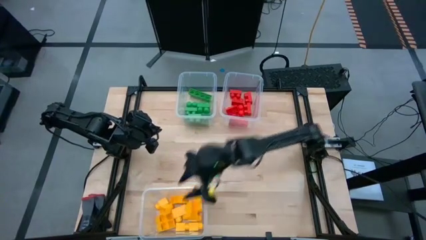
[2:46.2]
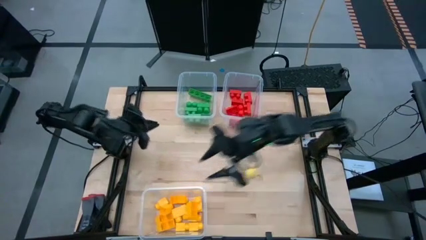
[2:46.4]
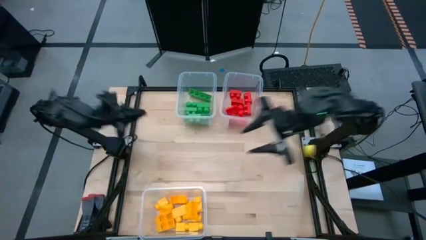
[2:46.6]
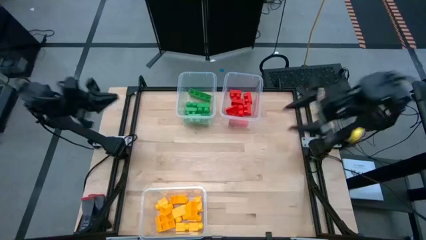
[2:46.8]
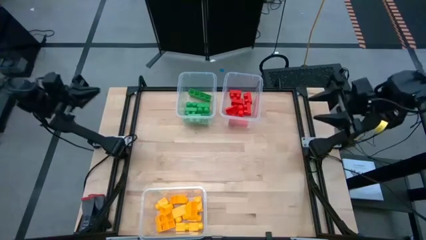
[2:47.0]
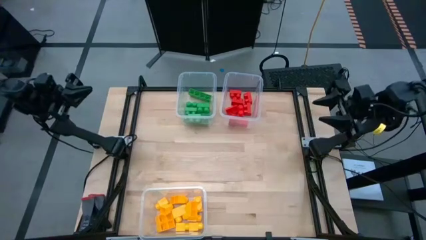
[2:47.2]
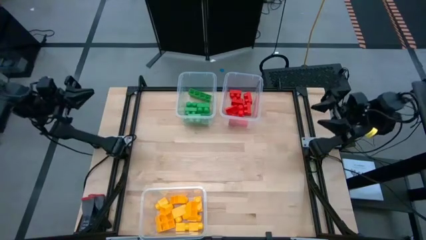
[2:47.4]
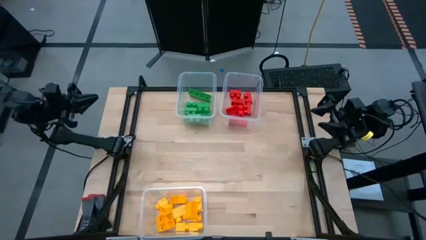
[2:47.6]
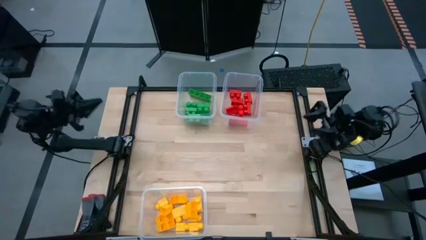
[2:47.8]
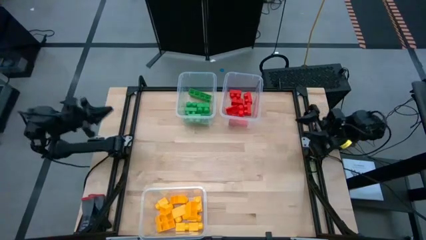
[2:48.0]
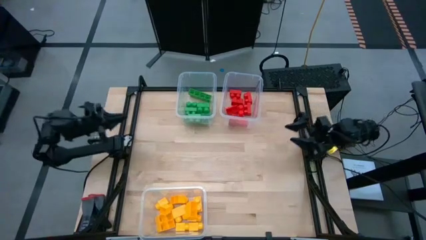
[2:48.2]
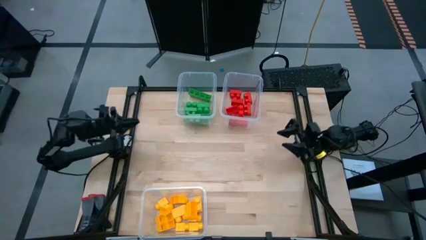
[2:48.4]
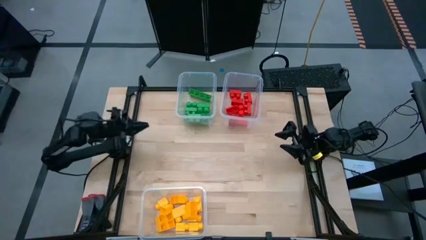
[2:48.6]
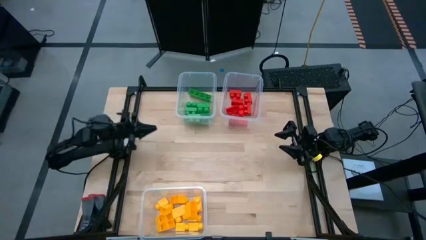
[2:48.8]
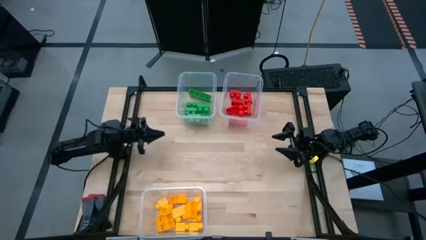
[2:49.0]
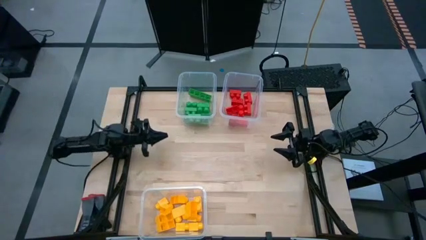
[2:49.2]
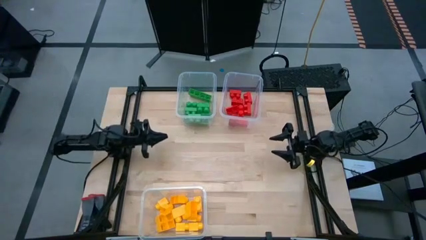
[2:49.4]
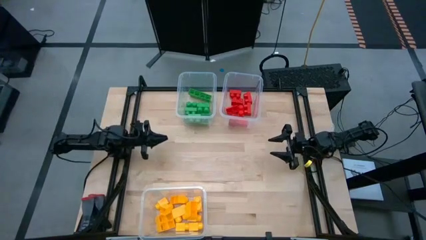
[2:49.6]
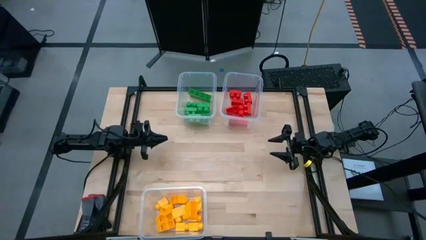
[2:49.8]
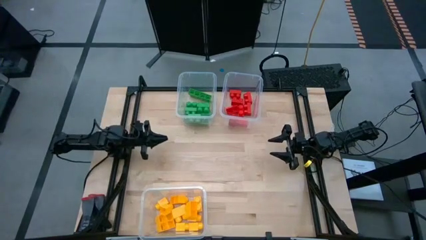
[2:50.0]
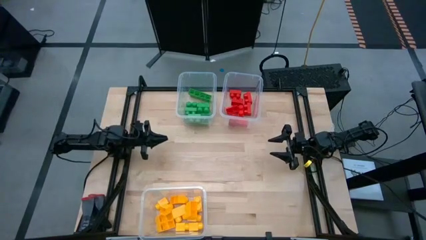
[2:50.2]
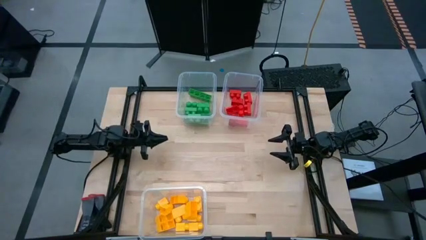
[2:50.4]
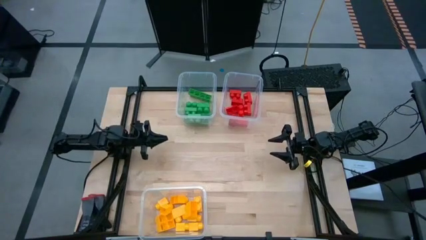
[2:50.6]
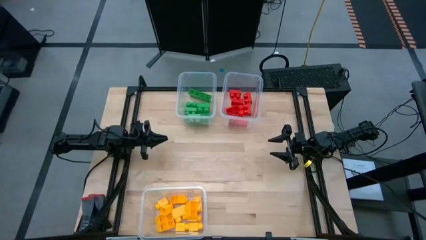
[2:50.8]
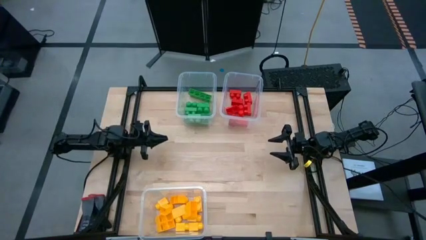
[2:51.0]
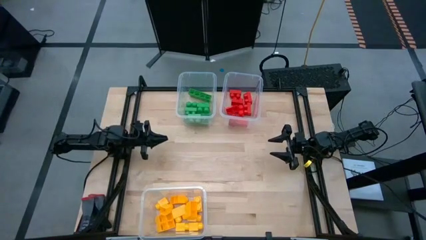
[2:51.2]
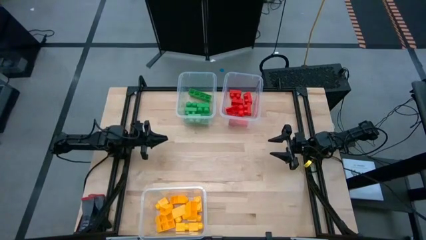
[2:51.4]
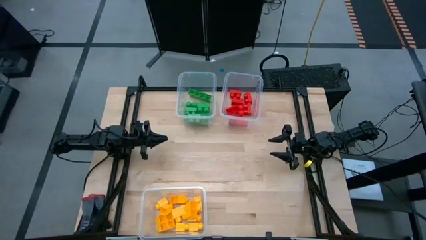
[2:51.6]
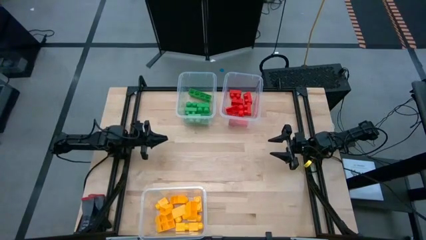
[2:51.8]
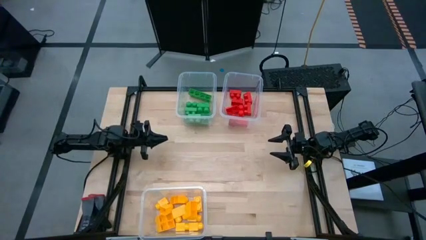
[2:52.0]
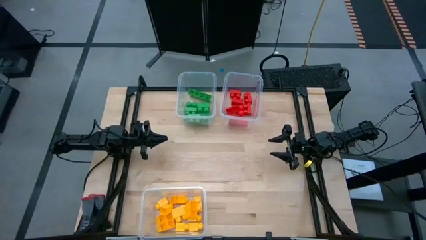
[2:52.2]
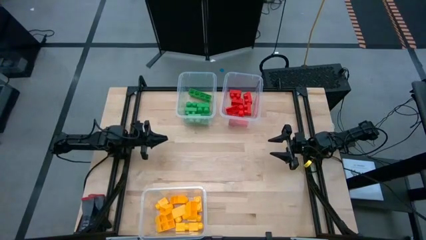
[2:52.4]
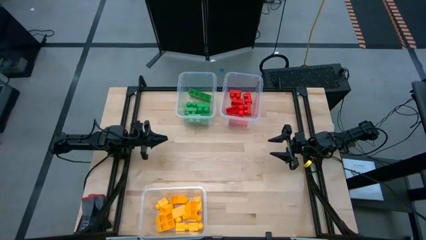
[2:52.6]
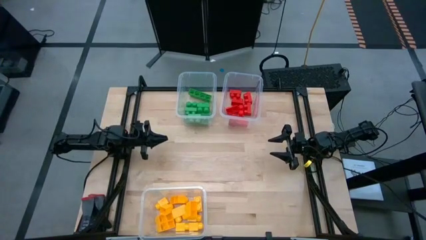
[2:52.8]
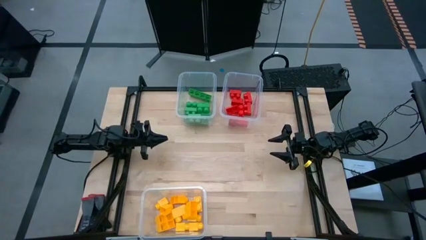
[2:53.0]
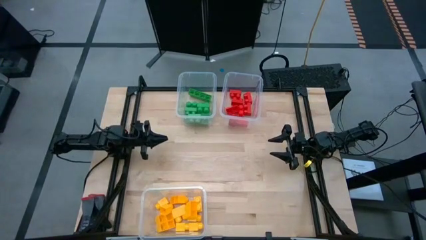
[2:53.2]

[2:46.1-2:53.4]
Task: Sort blocks
Return to Home Position

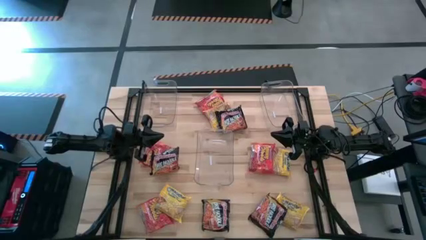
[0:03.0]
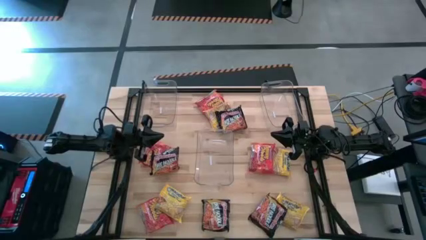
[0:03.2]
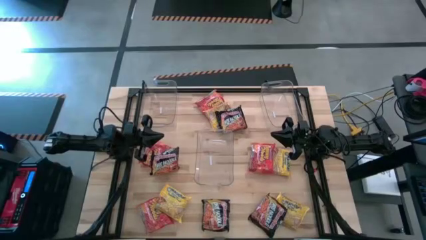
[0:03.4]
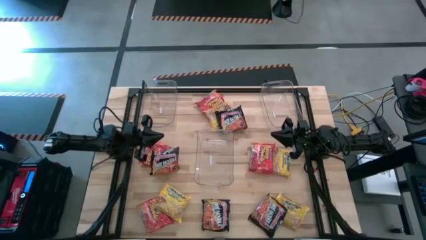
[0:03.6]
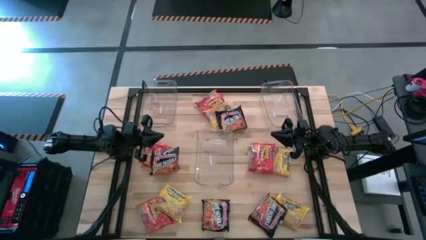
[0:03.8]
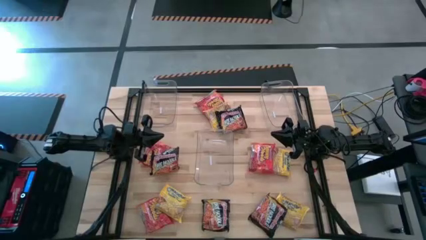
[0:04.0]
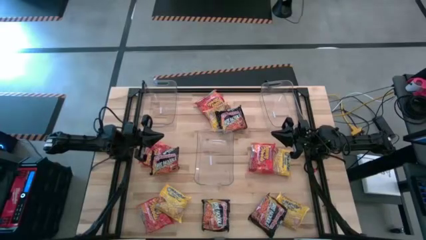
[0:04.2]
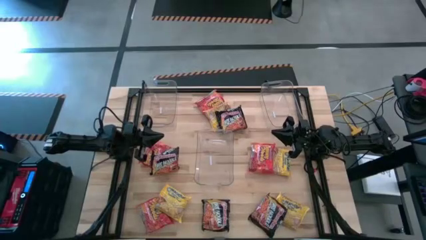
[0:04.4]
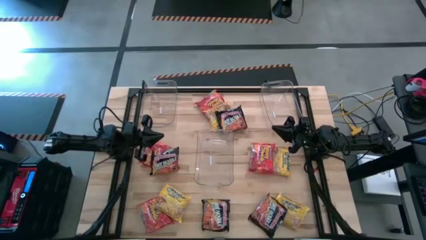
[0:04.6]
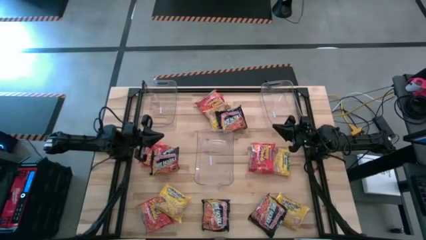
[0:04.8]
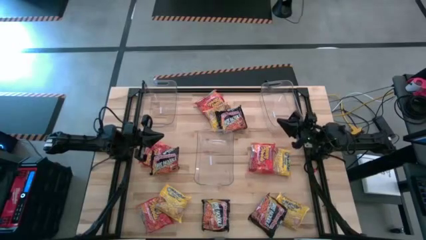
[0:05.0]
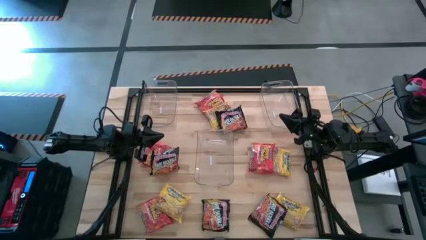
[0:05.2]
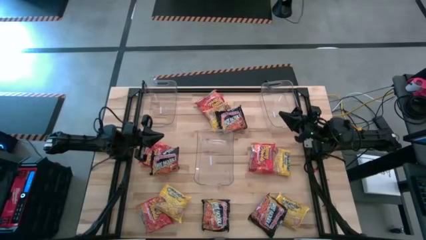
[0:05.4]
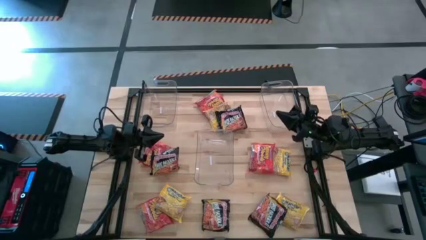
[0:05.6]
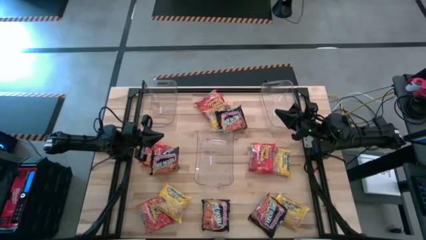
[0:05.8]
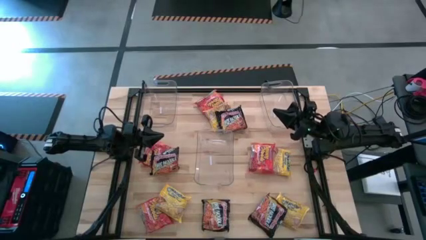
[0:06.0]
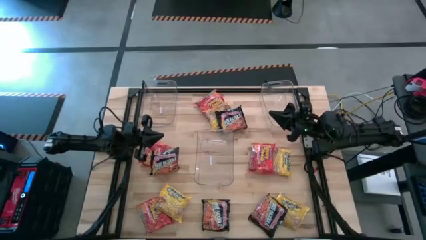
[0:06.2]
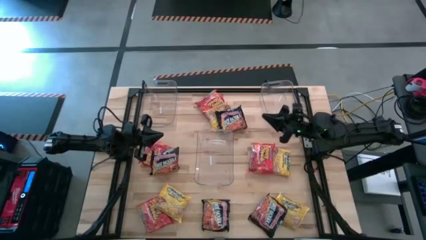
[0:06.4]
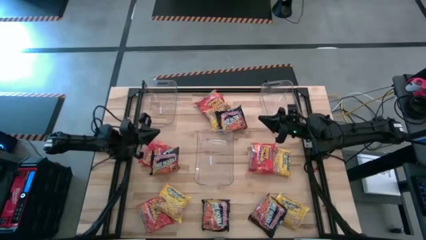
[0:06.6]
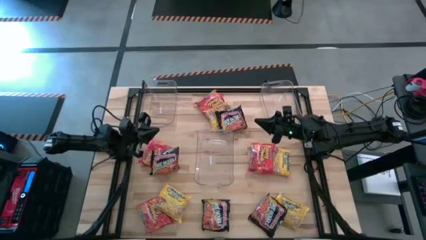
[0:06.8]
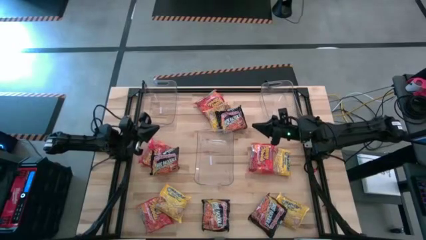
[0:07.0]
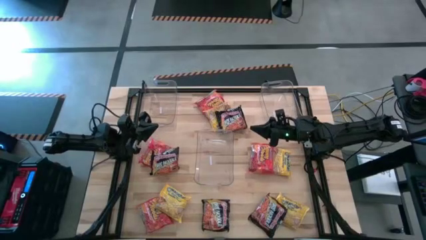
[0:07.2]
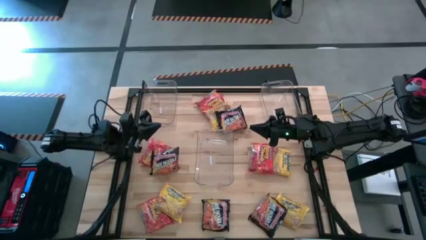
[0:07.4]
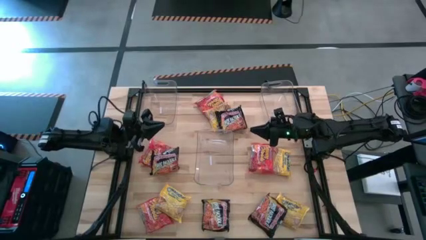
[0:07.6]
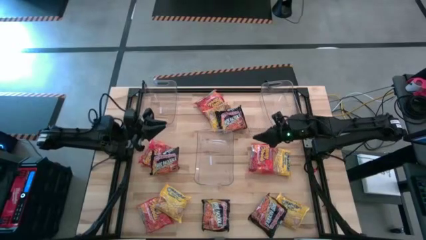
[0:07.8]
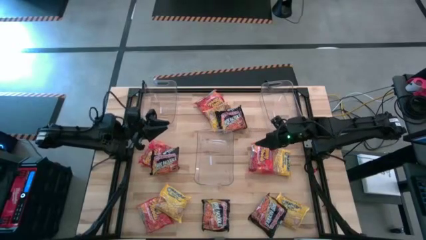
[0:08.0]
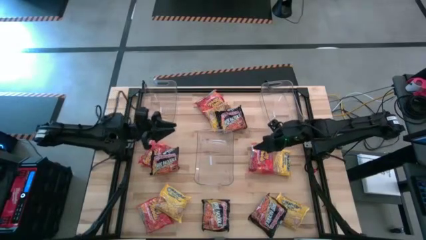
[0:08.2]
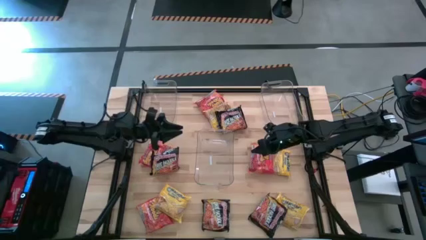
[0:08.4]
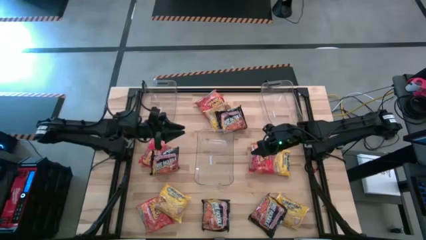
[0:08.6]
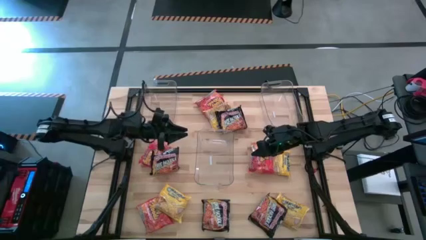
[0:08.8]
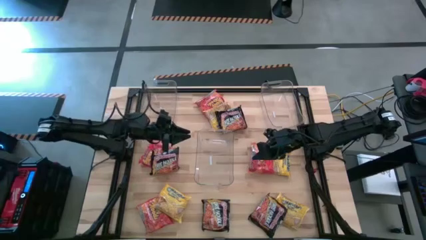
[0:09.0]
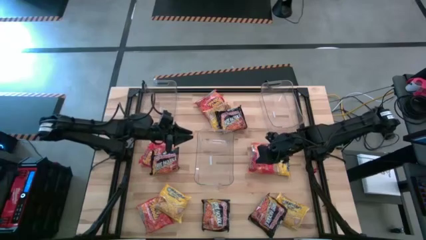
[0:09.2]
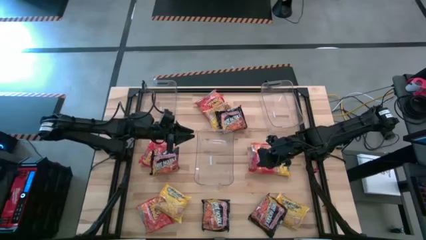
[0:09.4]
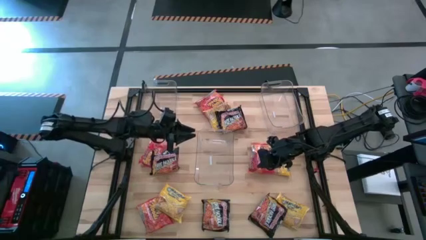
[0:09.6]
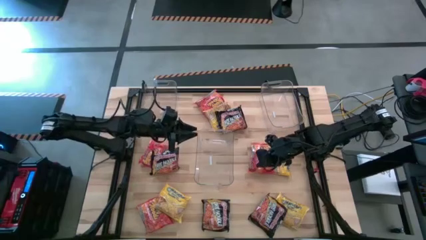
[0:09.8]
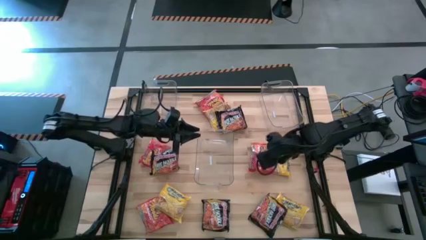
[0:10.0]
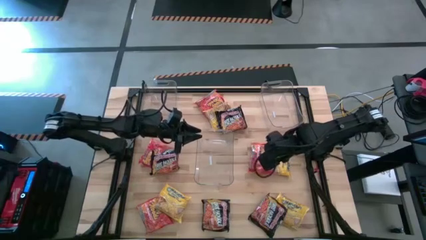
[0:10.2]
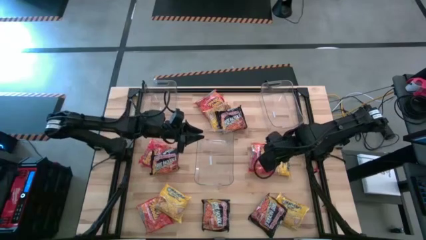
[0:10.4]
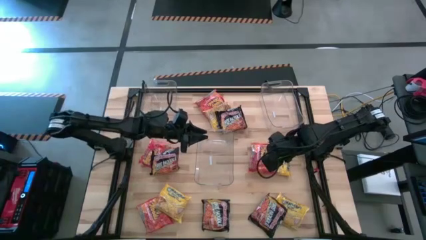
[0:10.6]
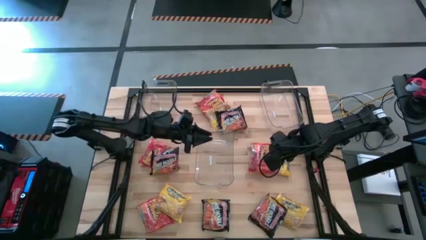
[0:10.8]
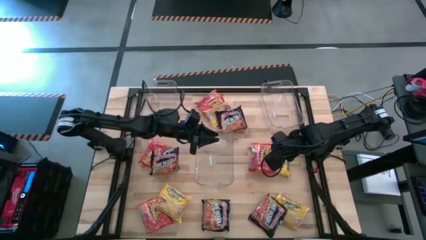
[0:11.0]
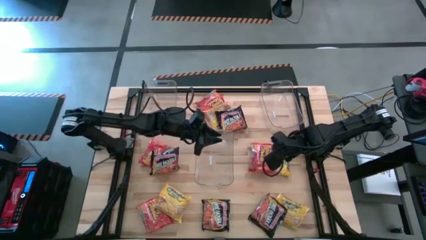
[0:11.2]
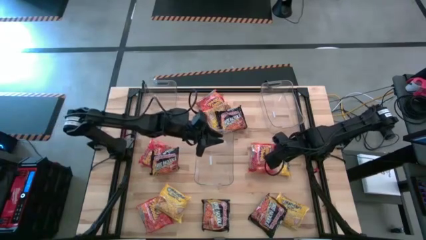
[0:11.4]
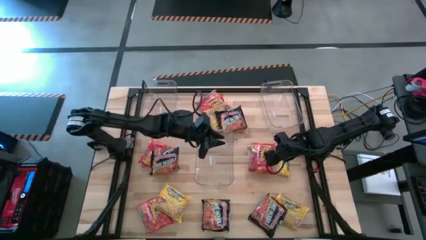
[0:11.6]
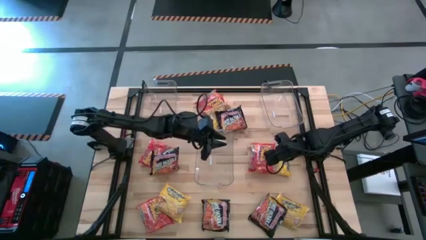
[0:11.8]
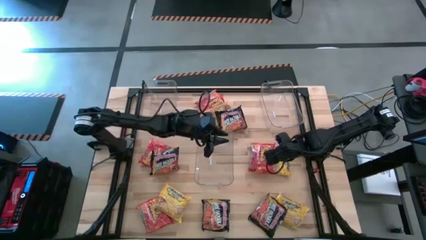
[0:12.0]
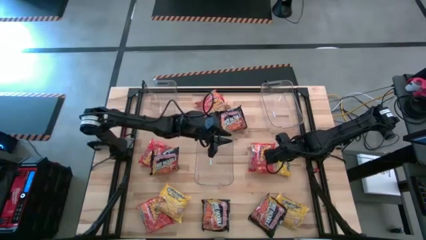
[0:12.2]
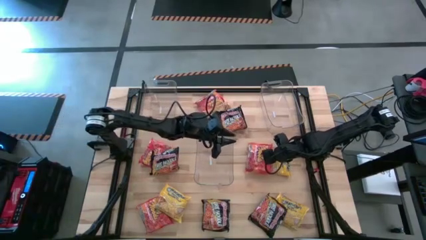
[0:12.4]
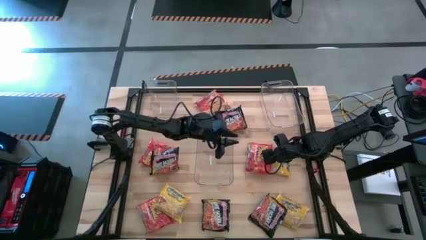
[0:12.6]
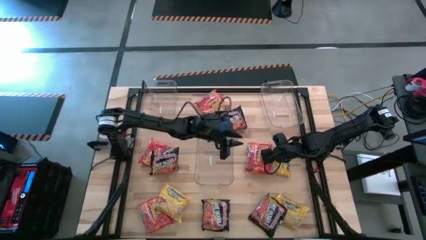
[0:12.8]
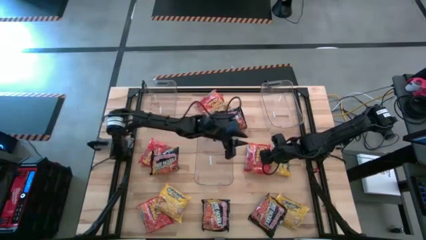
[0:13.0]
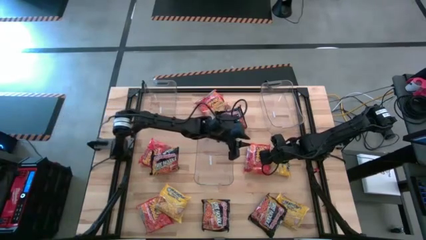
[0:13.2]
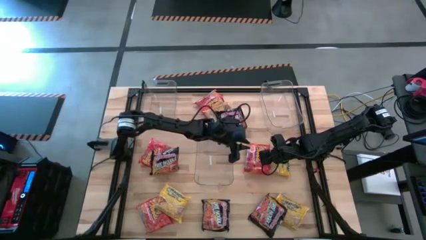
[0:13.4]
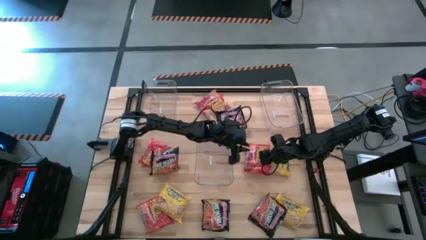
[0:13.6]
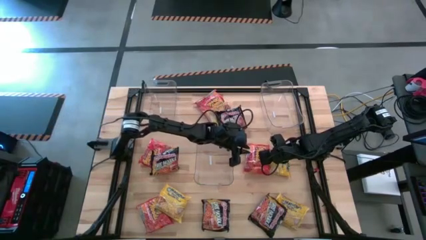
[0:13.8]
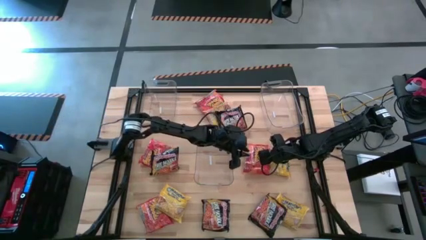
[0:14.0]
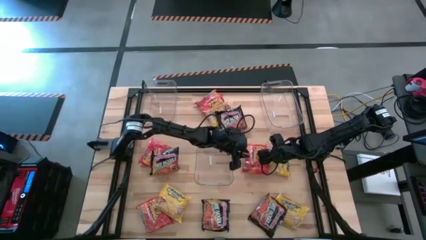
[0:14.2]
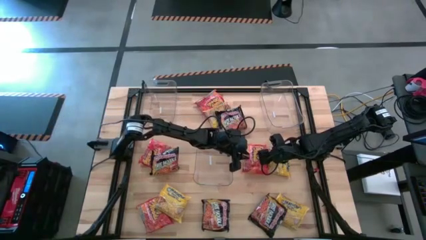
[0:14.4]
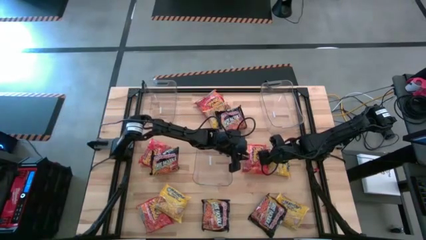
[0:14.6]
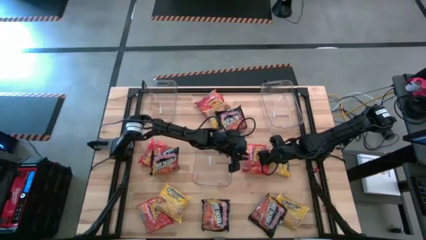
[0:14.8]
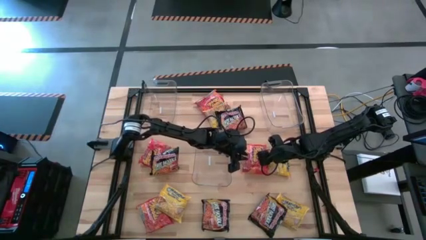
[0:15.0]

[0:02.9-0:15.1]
Task: Sort Maruchan noodles
Put the black noodle pack into the top right transparent bin
